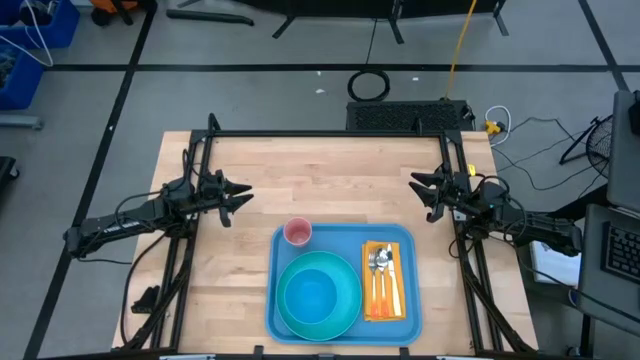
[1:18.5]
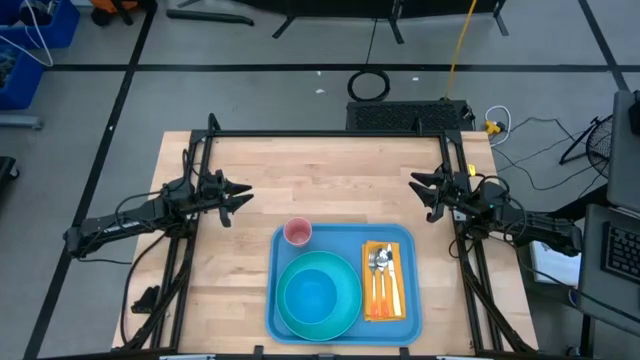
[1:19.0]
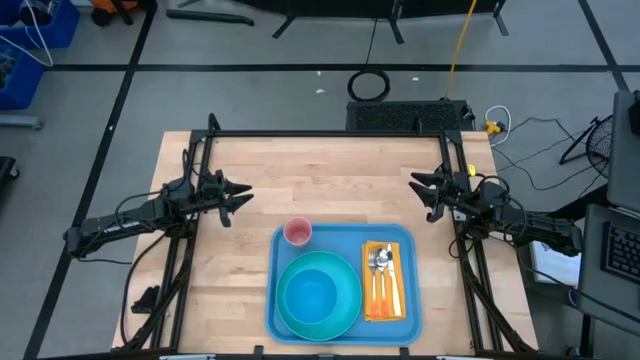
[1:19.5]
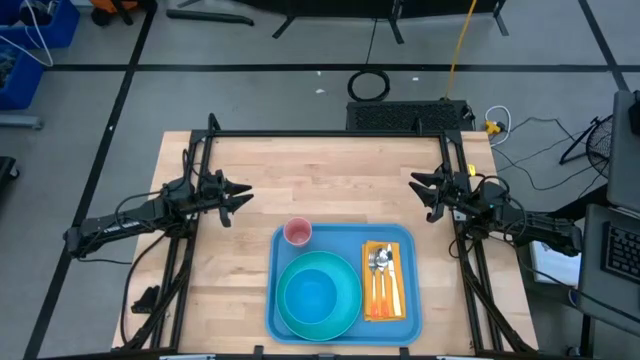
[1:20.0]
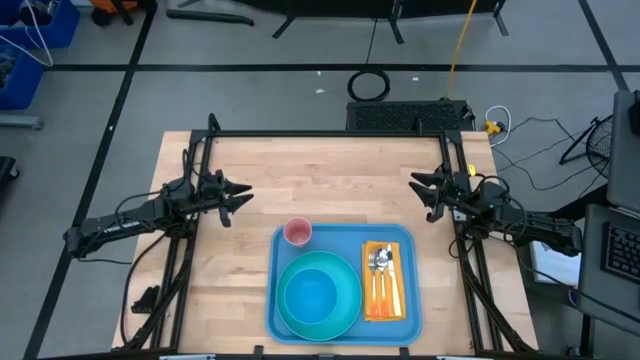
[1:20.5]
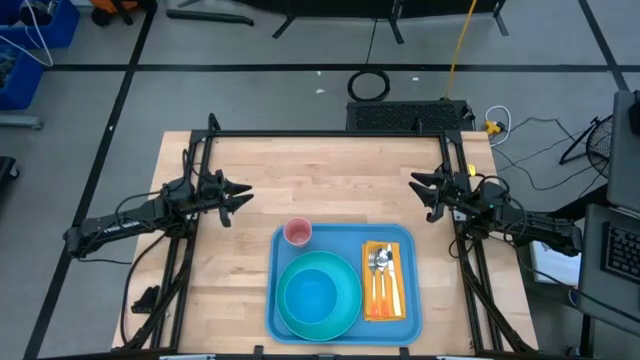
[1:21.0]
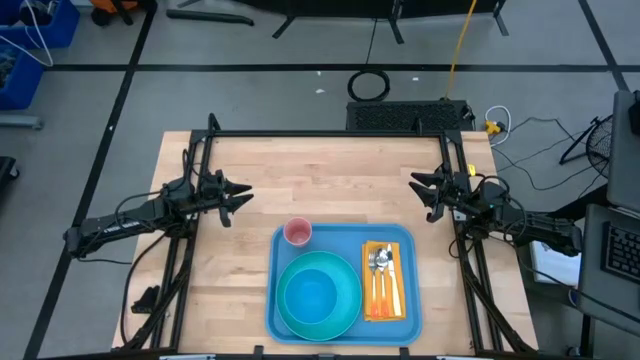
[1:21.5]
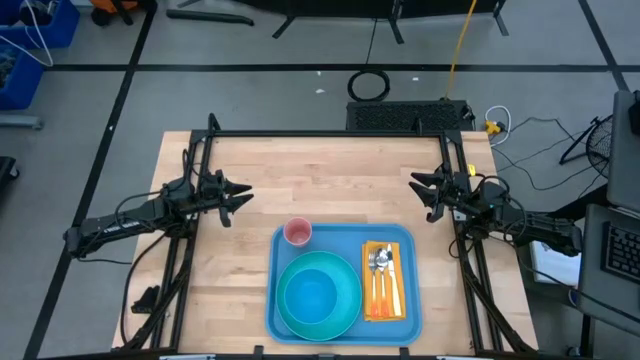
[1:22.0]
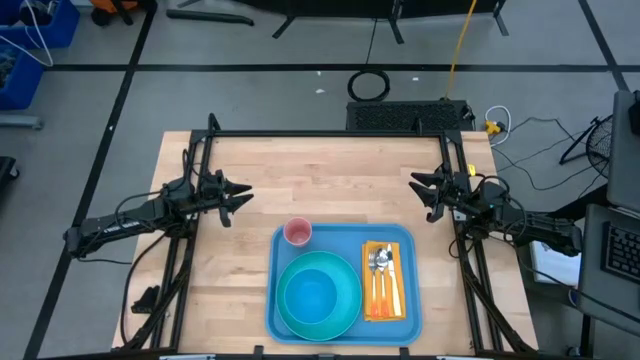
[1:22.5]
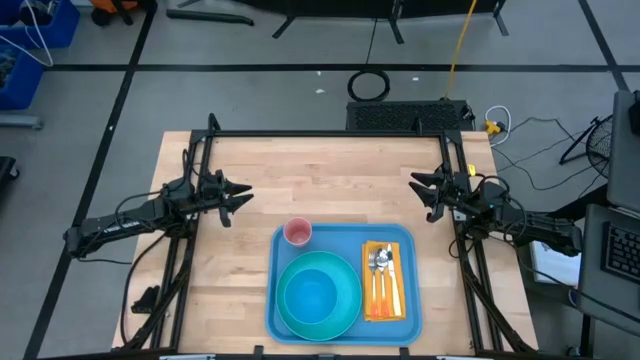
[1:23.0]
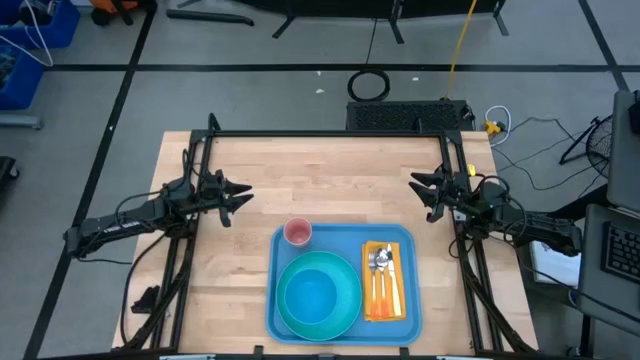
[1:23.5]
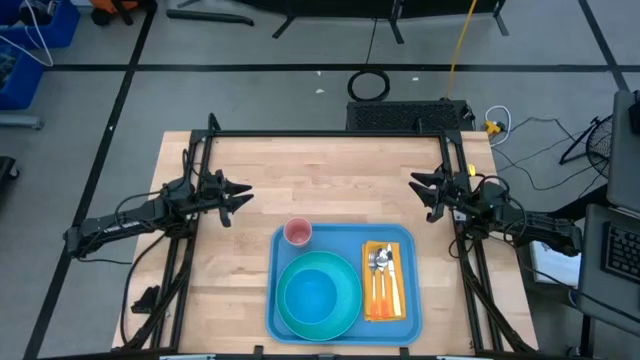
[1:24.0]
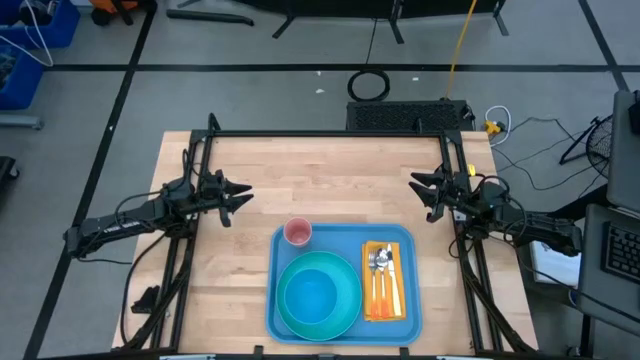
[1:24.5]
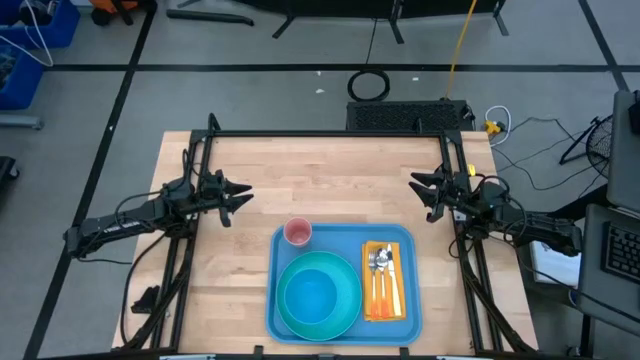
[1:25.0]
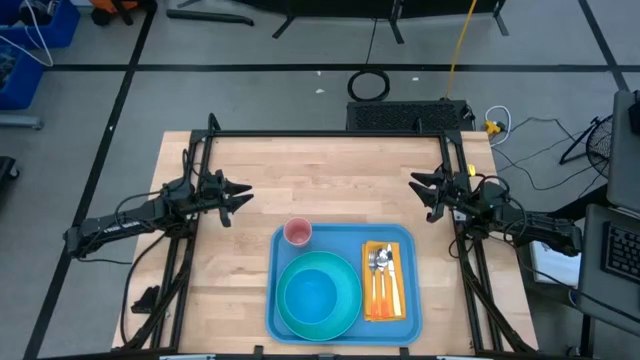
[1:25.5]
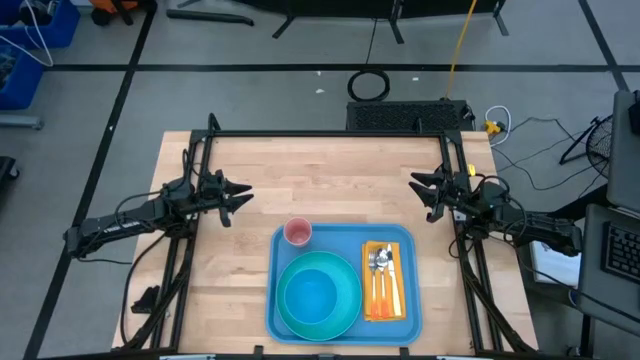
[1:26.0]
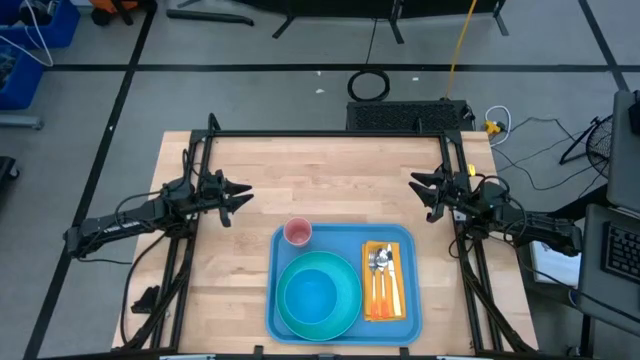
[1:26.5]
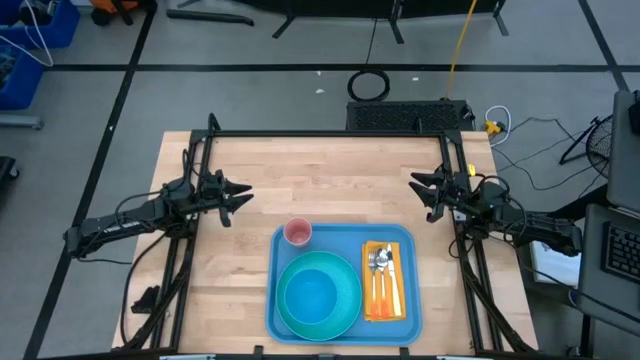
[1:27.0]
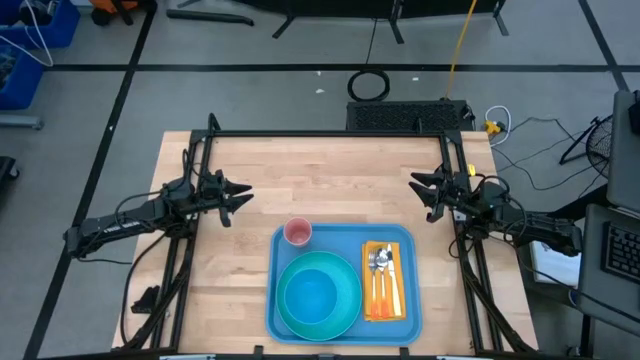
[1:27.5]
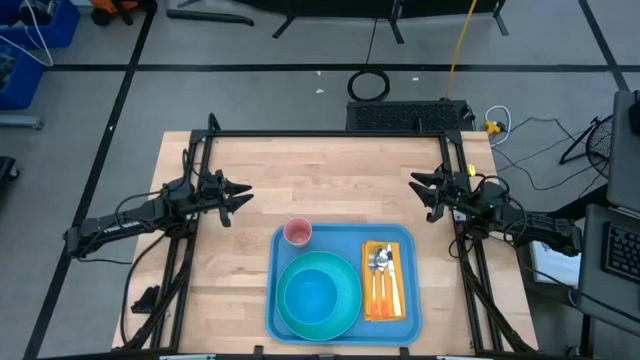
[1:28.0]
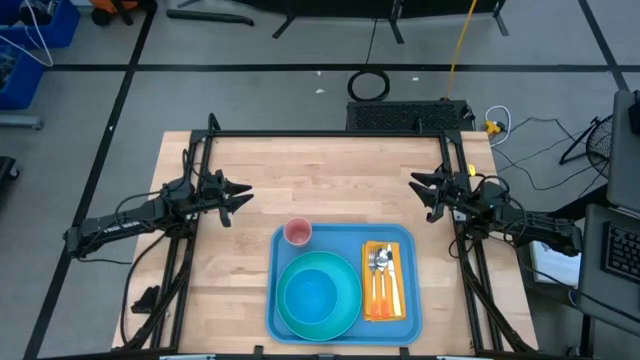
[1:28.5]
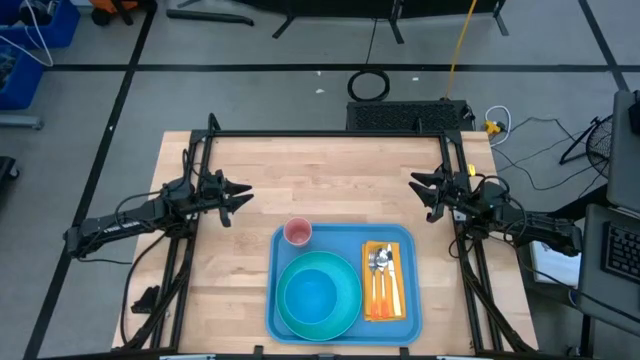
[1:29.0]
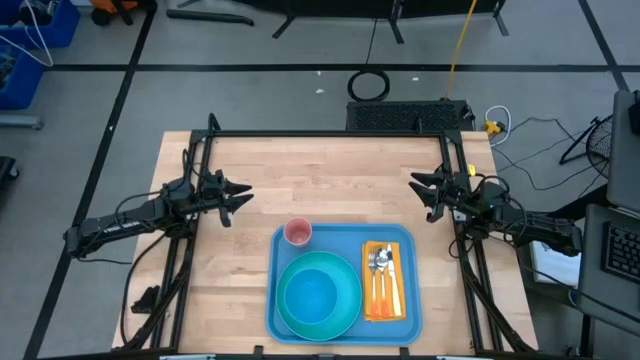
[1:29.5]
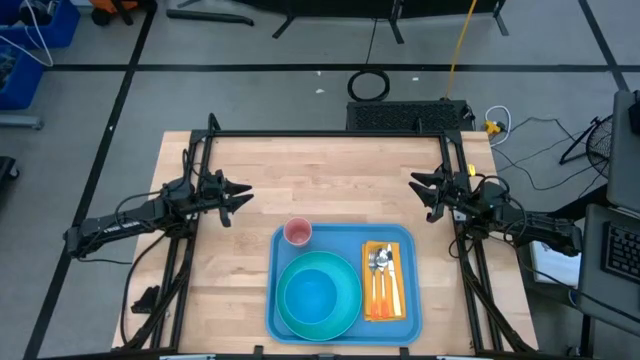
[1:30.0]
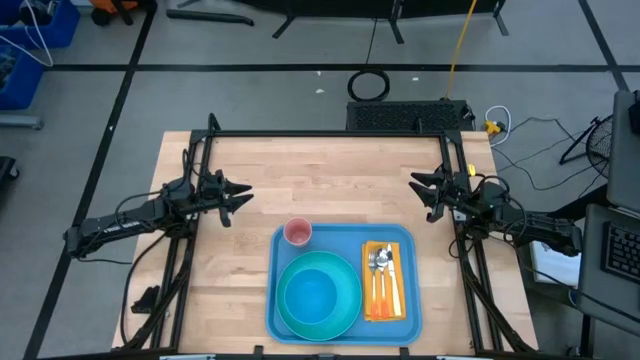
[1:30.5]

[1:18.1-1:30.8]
Task: Set up tray
Return to Home Position

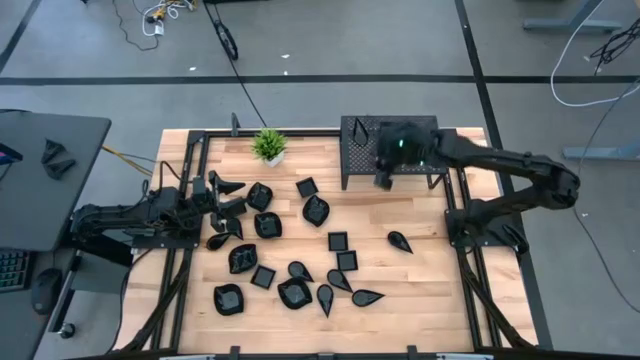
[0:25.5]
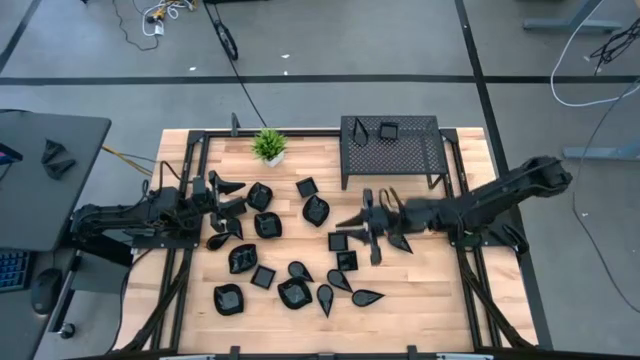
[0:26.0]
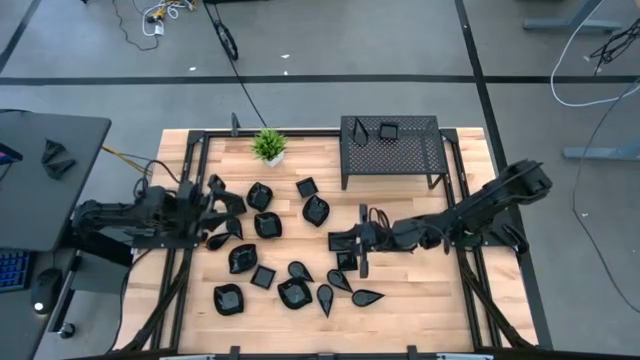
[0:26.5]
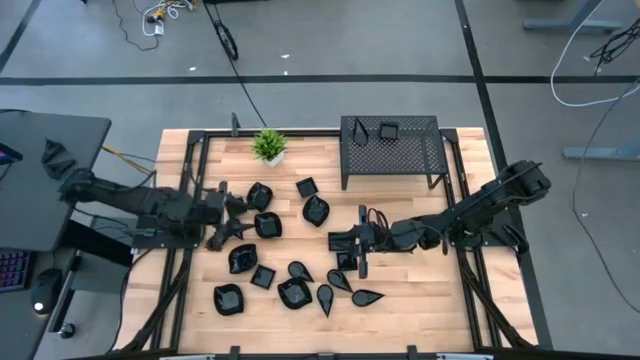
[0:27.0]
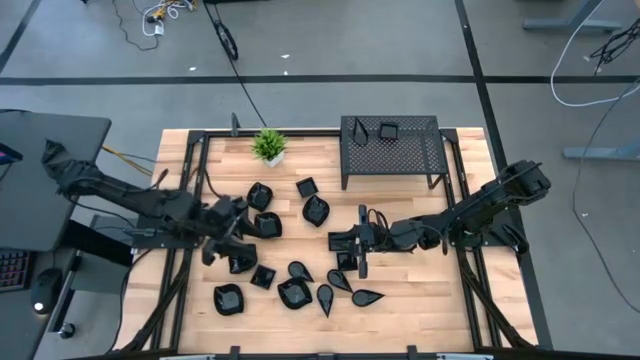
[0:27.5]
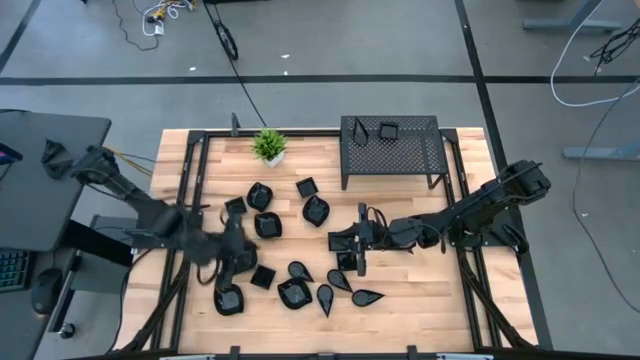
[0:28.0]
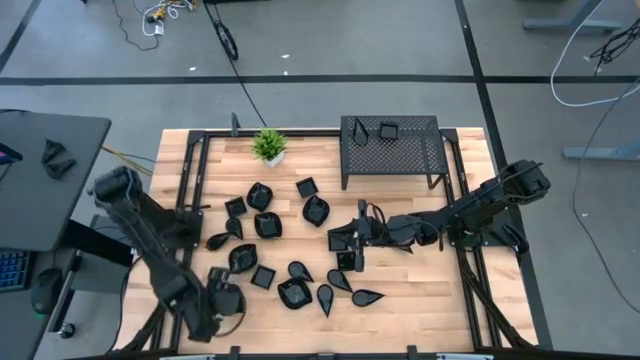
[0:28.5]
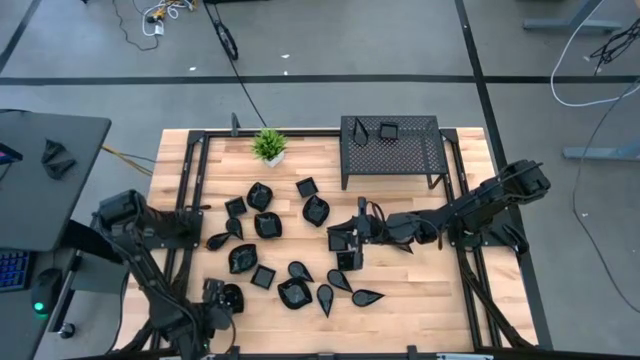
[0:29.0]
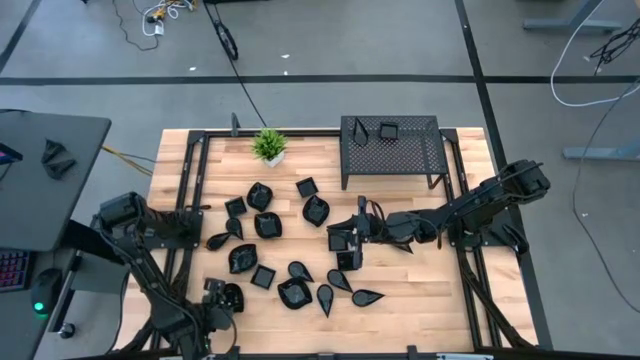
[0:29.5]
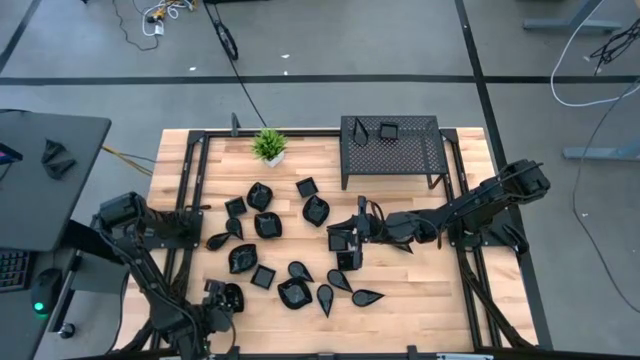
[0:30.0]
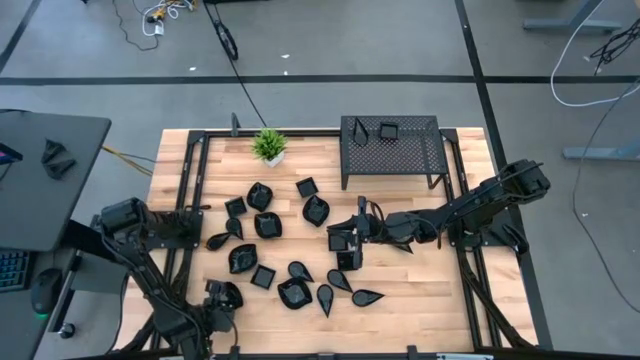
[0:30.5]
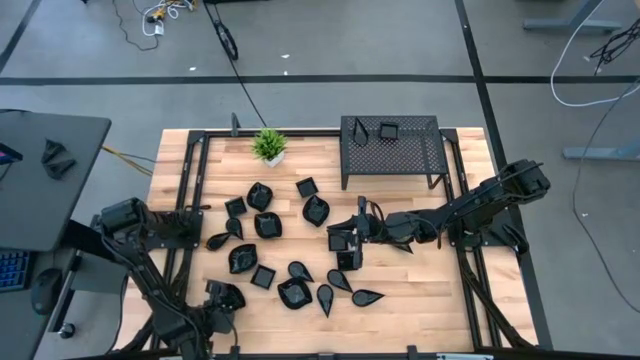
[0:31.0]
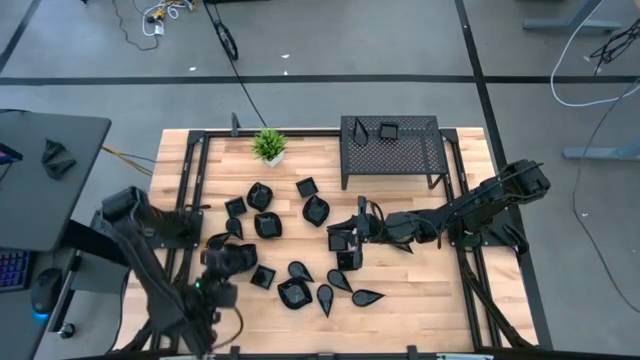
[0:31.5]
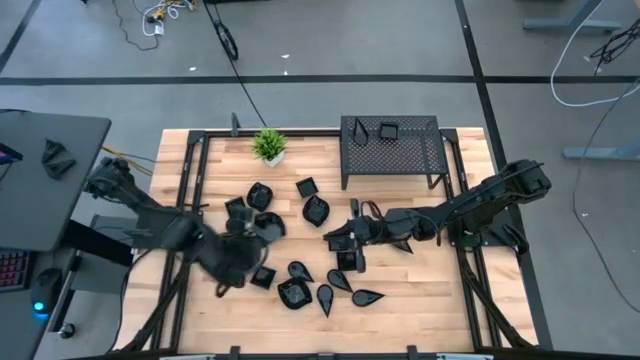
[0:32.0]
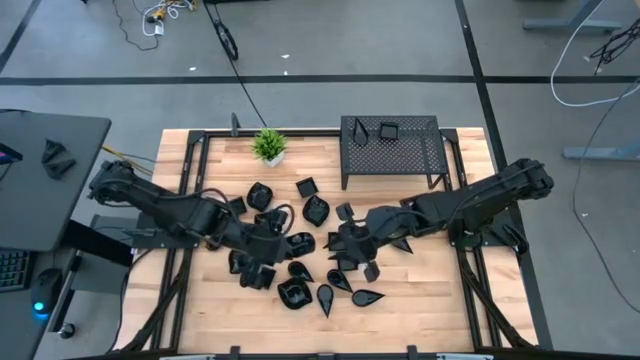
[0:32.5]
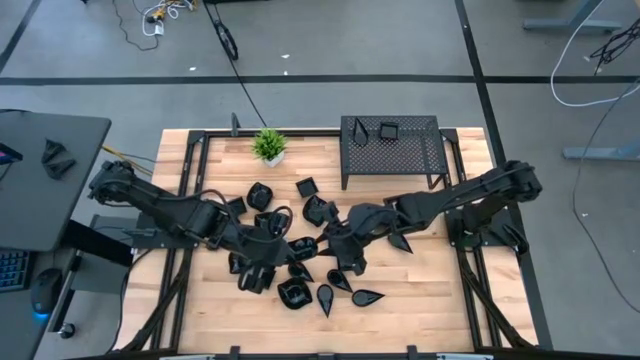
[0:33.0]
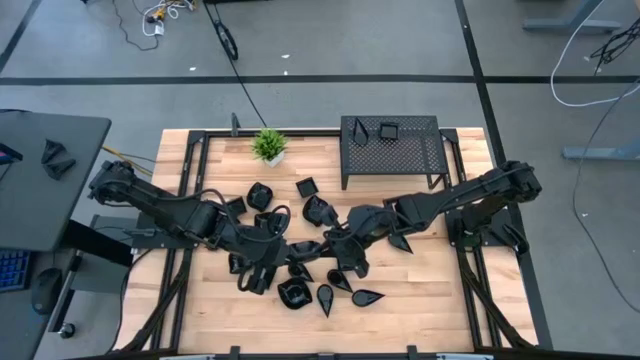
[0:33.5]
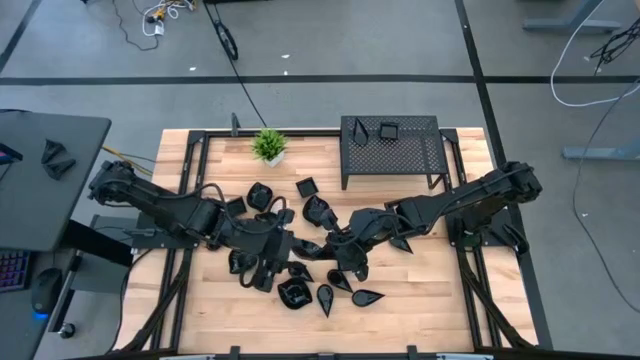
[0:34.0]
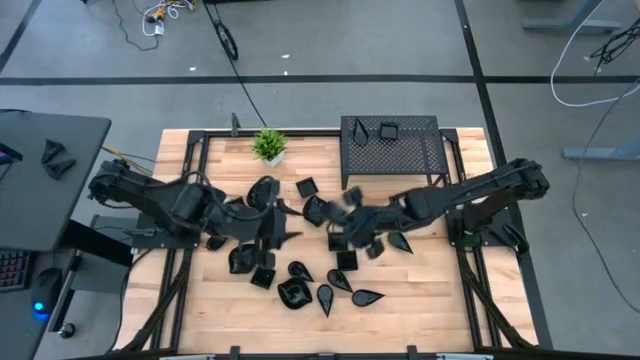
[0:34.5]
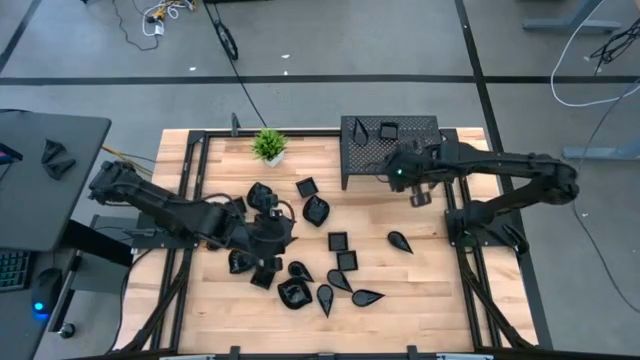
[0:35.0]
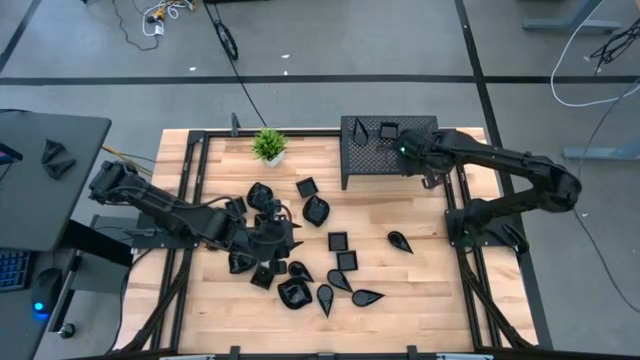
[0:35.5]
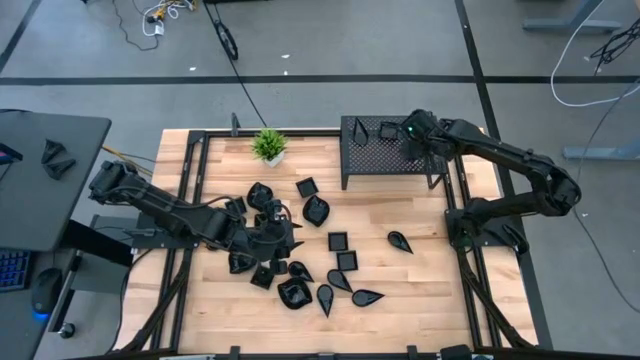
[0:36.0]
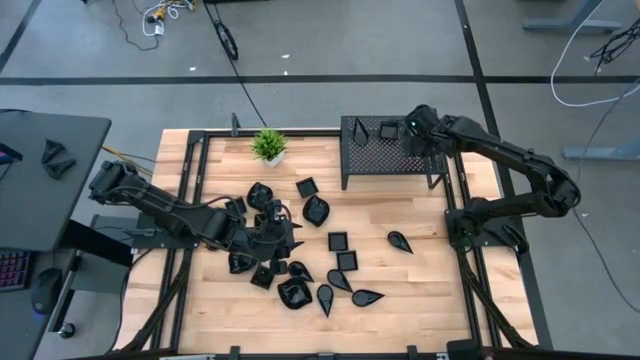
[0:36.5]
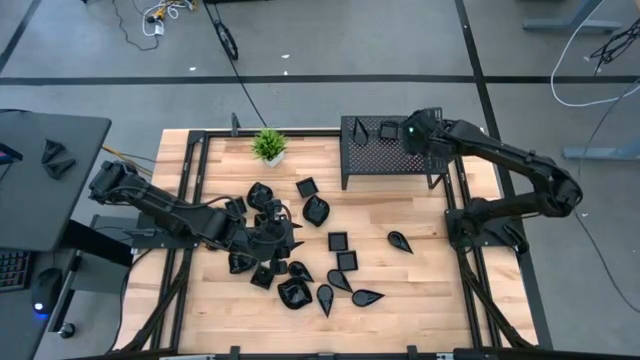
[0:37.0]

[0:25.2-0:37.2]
Task: Pick & Place Mini shaped plates
Put the black leaf-shaped plate on the shelf
